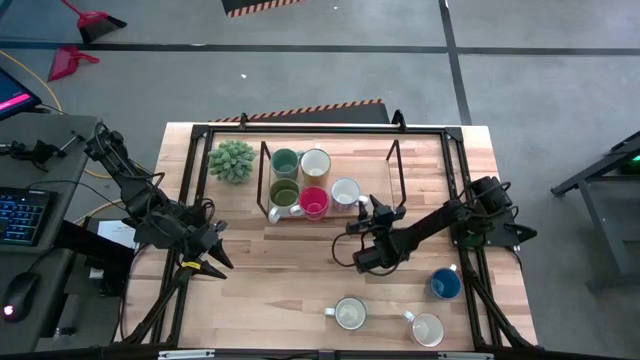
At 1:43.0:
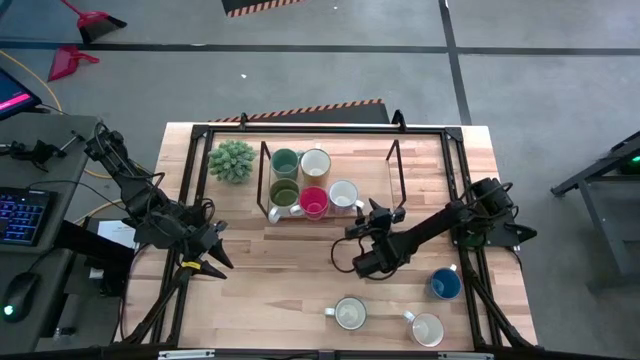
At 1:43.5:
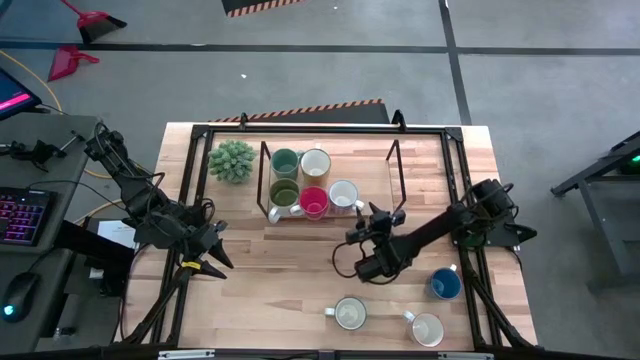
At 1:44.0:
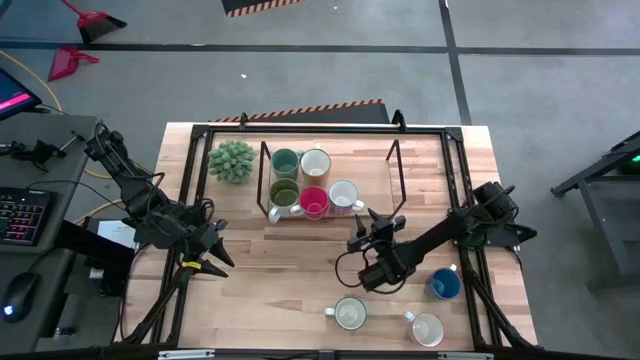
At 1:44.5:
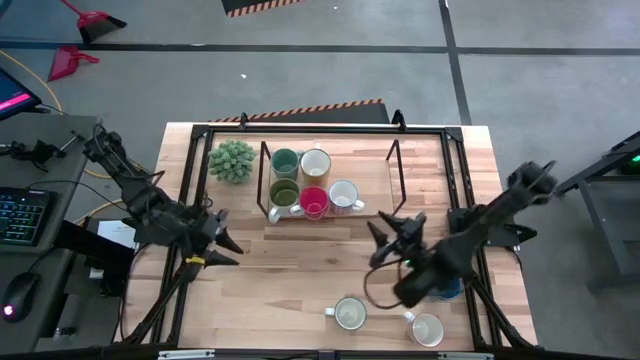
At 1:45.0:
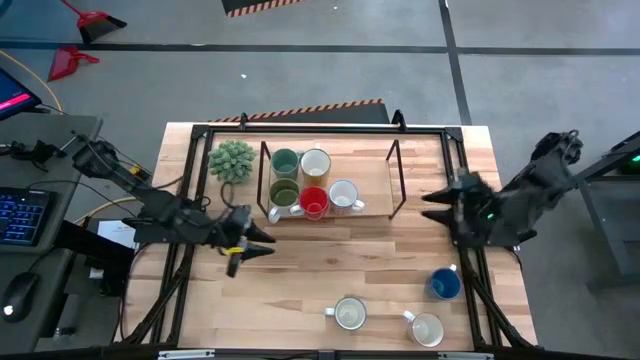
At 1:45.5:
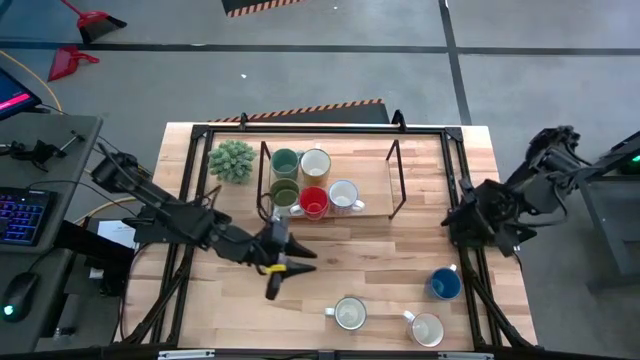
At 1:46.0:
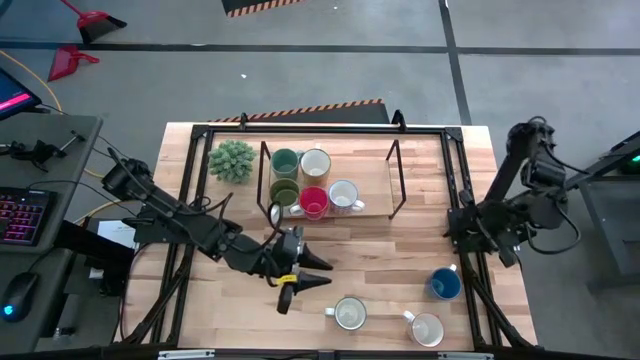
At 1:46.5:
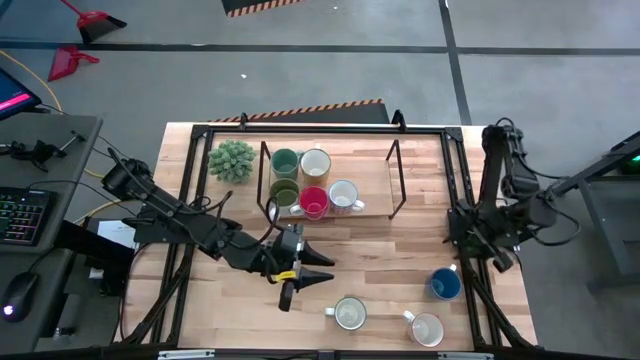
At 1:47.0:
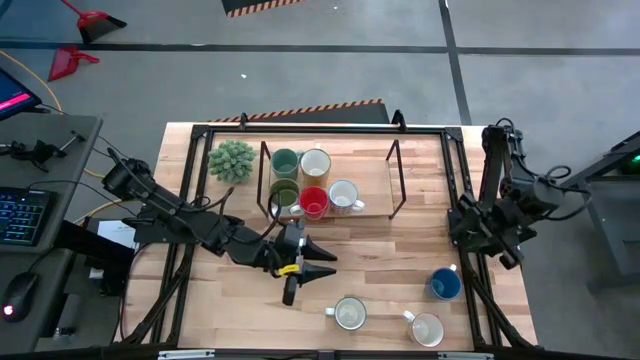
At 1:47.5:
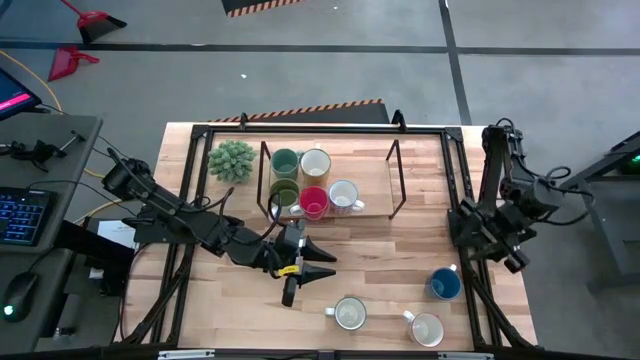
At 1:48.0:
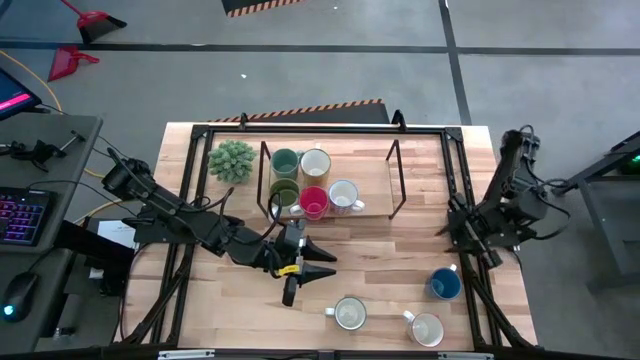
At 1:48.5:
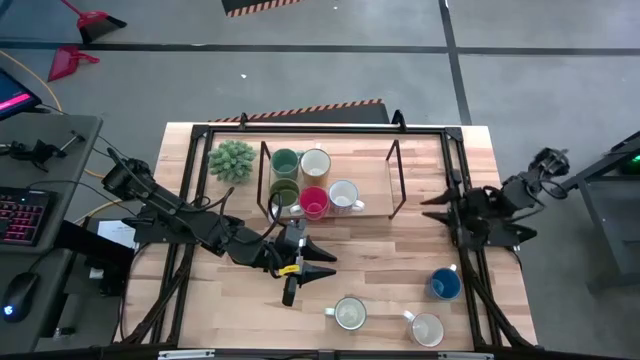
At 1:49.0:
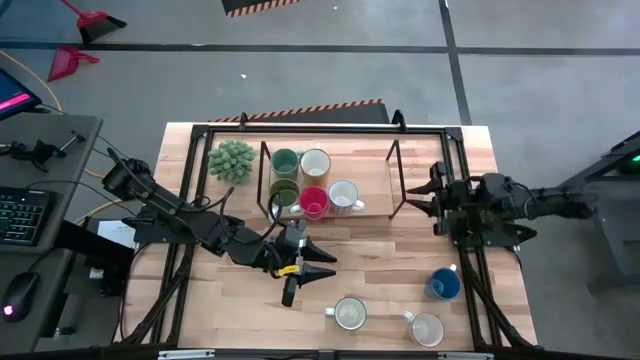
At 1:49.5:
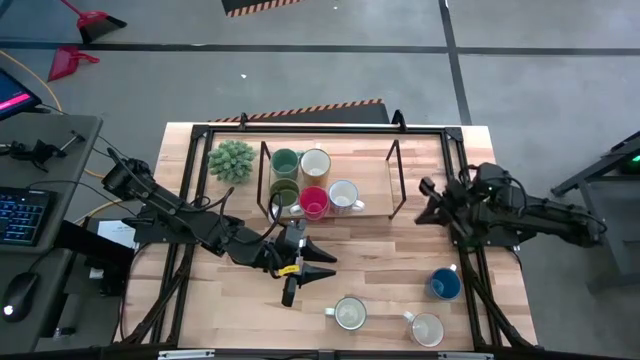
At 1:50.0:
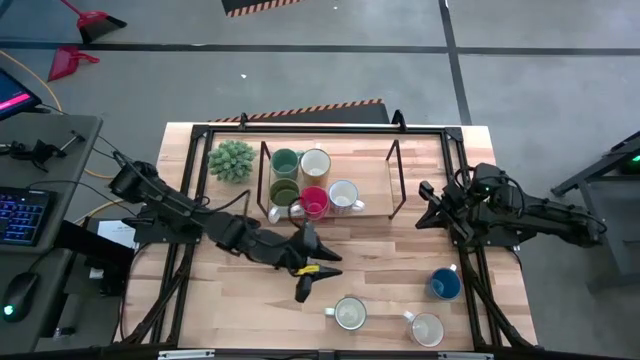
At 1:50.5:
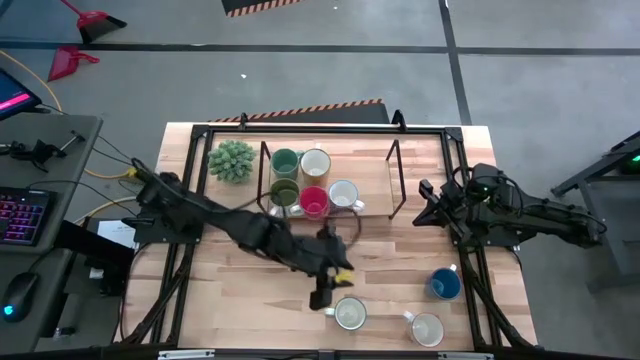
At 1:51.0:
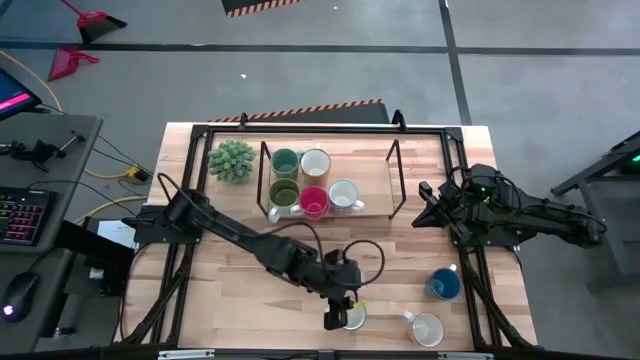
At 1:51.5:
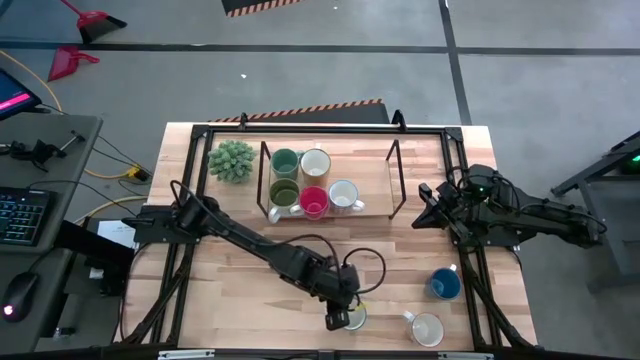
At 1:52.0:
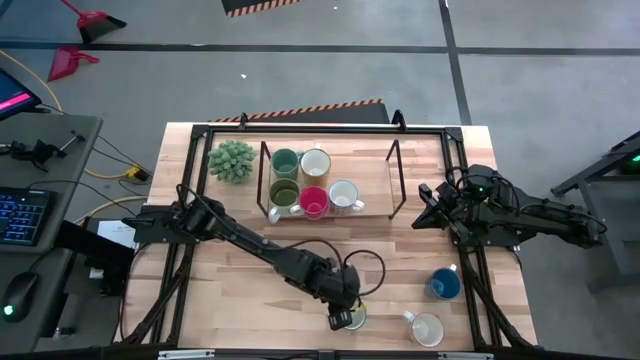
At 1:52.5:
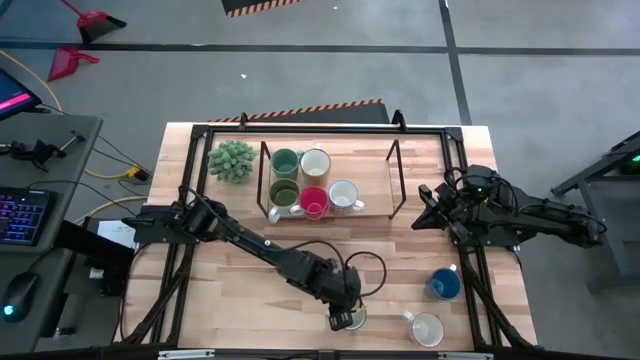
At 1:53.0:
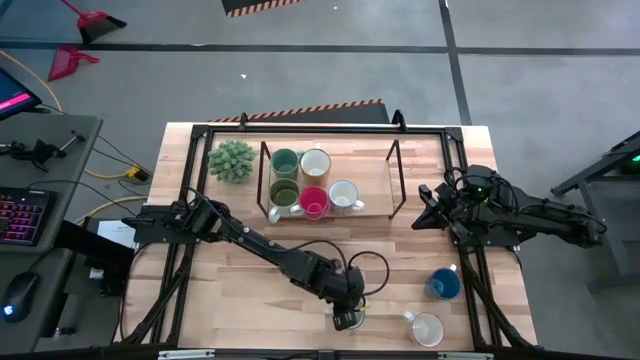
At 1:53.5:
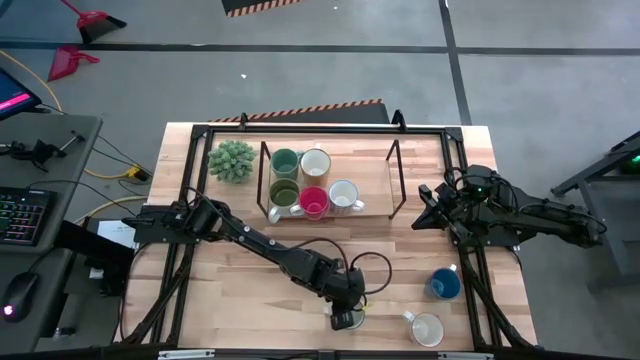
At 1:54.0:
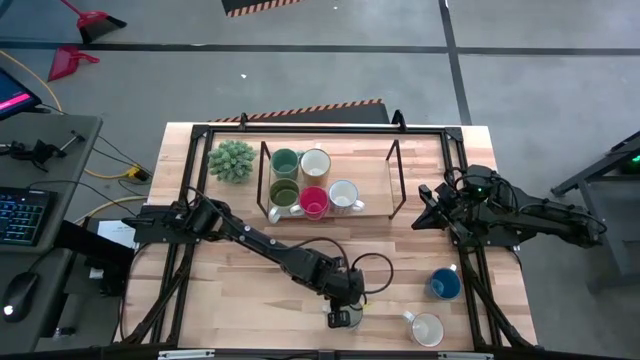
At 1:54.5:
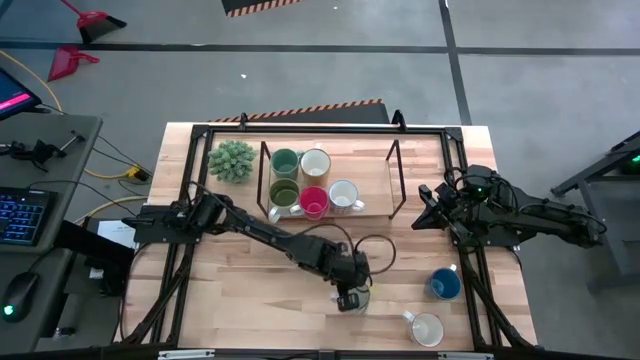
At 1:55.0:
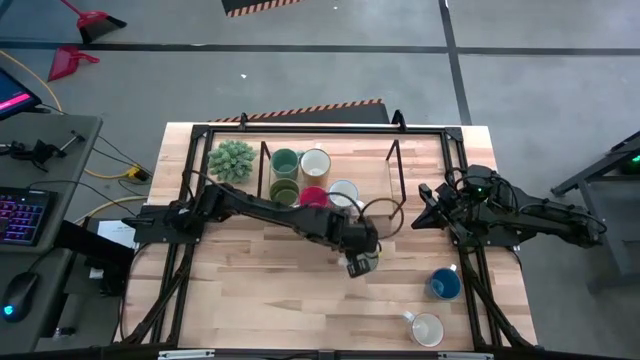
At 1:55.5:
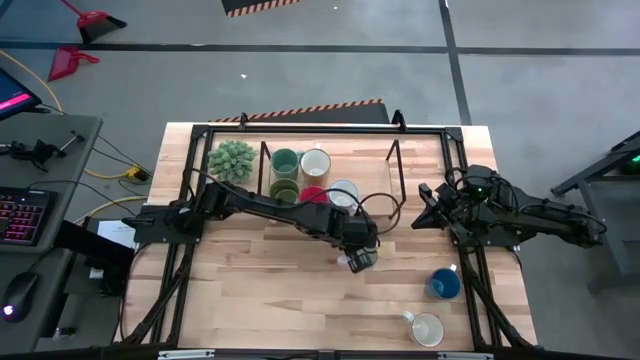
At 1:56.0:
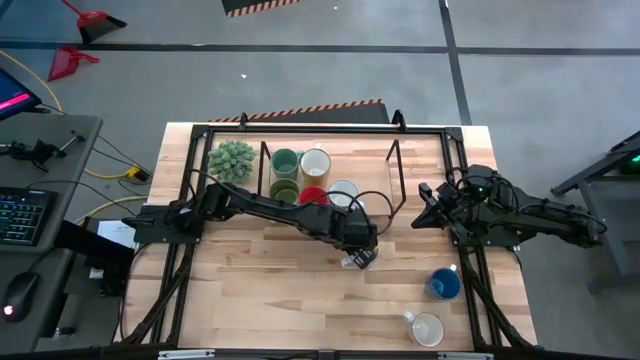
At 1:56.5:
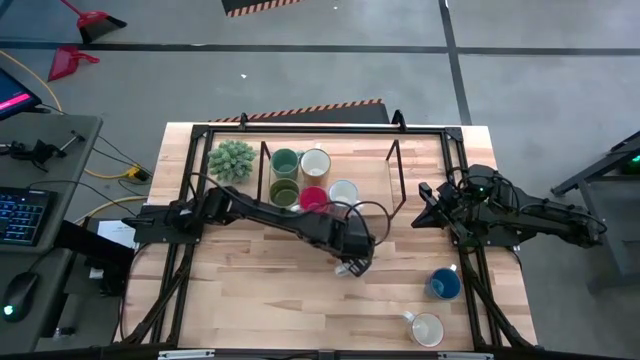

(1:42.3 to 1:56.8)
Task: Place coffee mugs
Put the dark blue mug on the shelf
